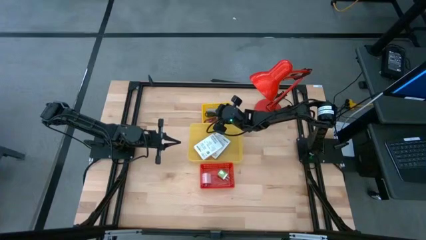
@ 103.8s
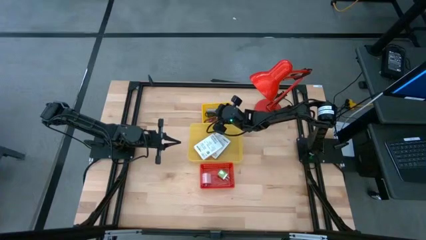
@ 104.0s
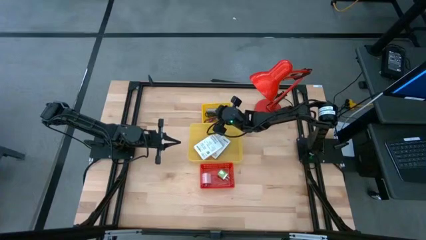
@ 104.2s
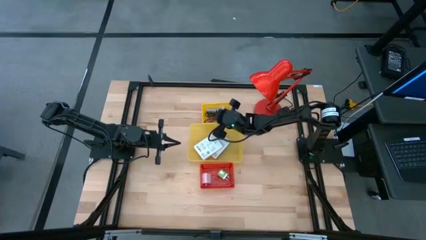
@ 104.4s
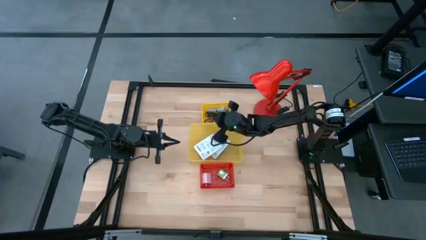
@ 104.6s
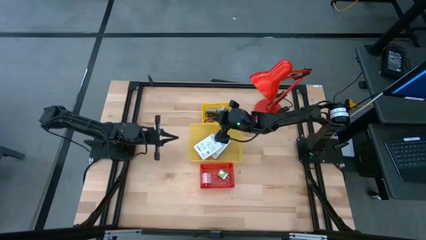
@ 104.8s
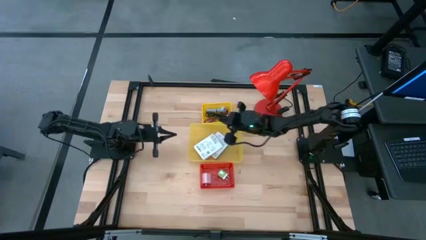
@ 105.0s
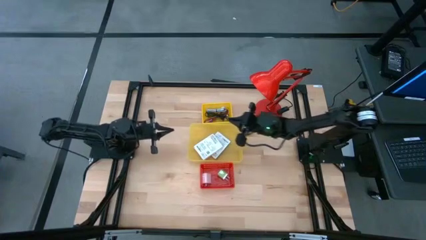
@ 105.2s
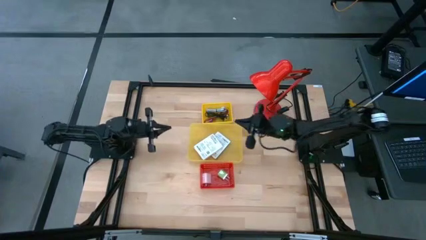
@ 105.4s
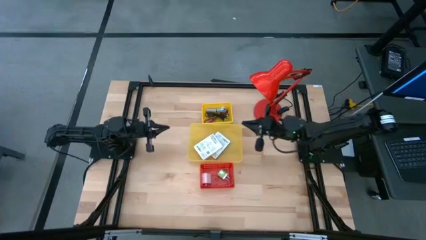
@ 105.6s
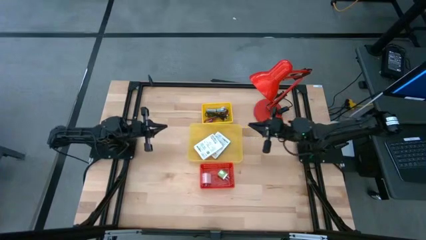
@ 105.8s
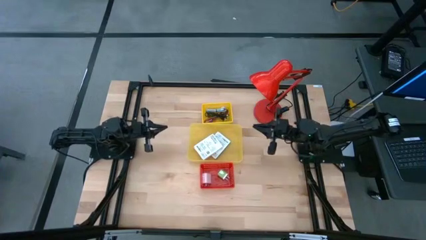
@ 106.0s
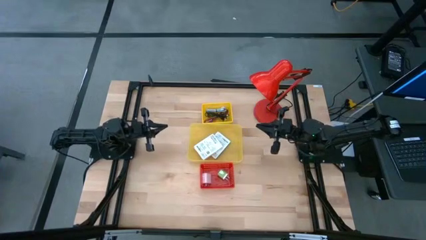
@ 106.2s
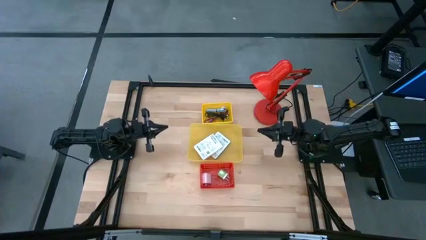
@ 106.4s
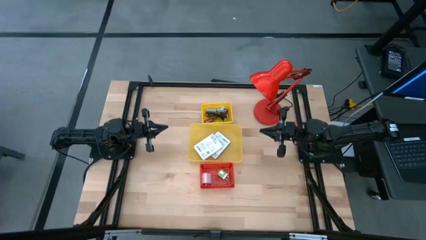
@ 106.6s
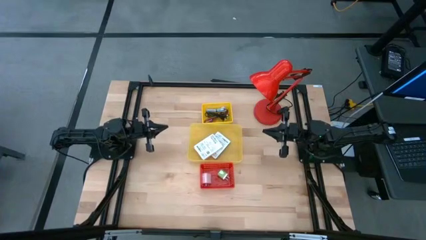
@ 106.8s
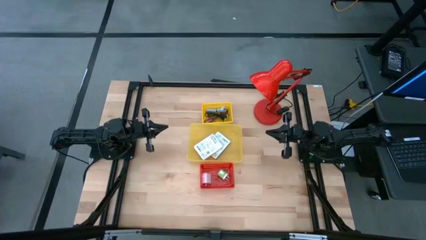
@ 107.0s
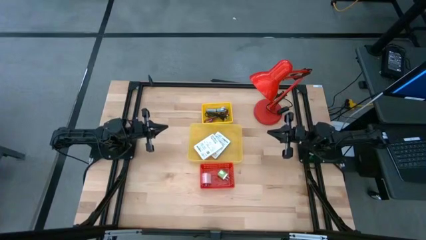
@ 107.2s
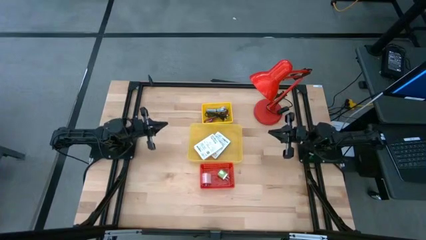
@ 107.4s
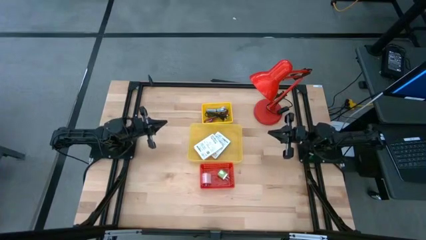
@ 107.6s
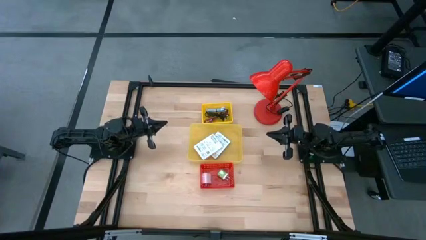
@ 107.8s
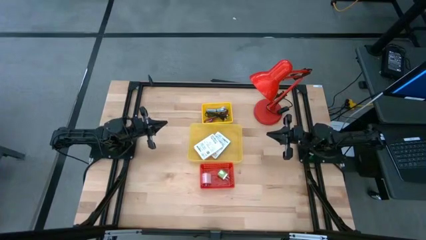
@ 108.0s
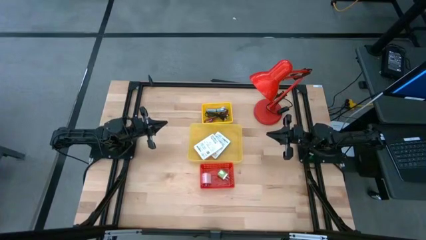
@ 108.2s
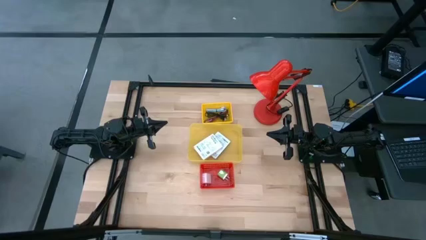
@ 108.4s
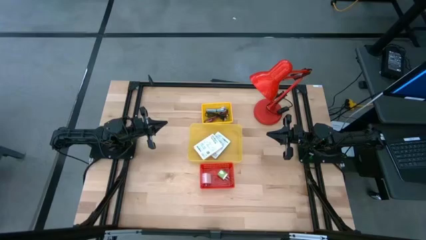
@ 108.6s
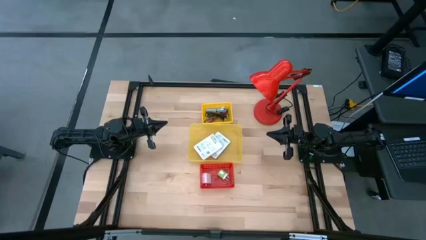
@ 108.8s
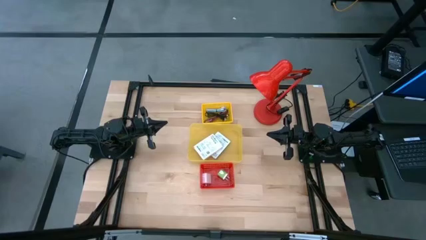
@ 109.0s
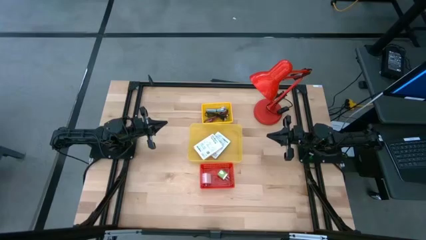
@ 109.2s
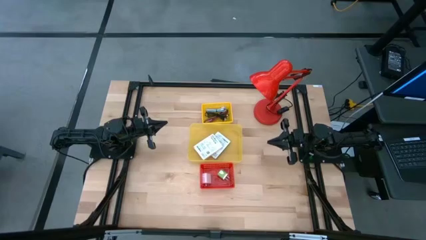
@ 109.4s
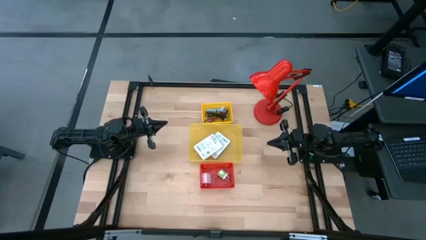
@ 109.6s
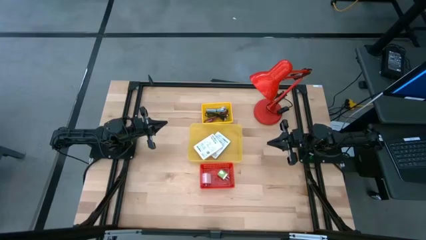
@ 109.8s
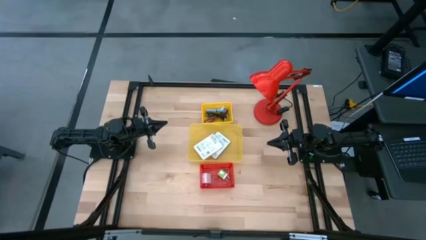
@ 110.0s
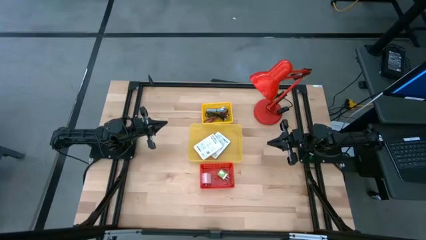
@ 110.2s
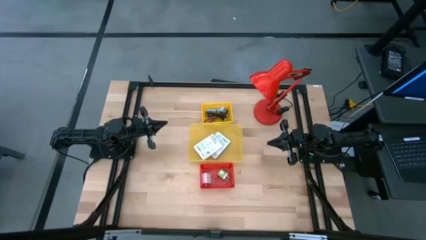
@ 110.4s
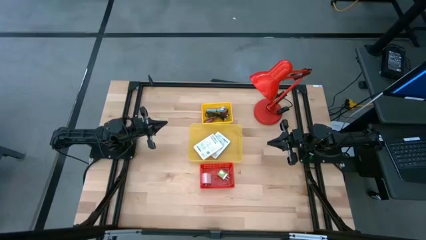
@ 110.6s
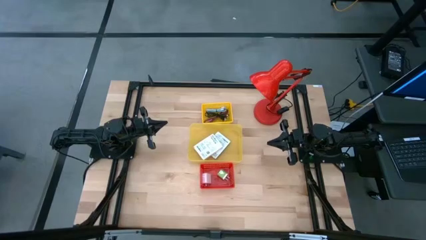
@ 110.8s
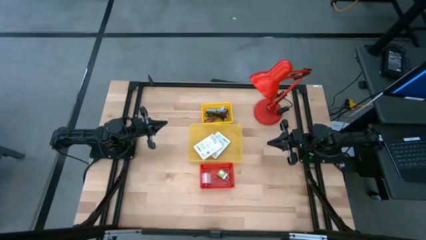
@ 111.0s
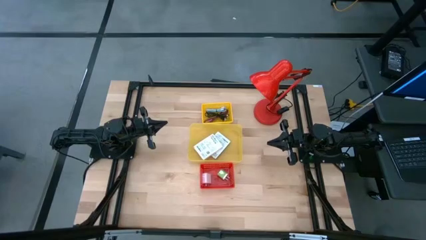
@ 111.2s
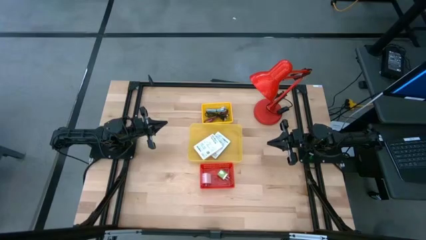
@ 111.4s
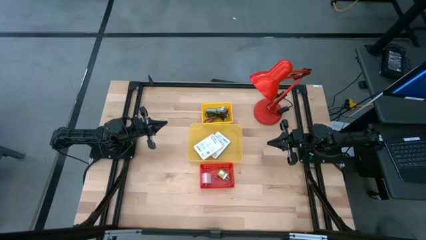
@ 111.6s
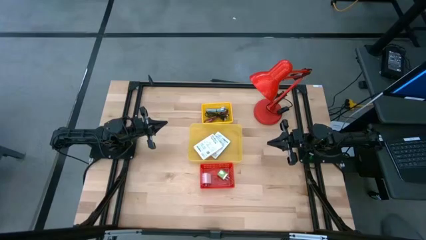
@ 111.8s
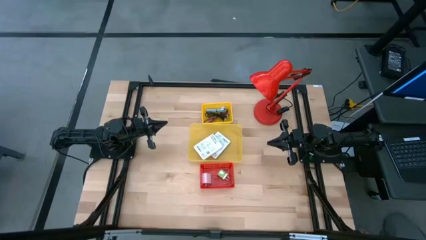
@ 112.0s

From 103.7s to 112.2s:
Task: Pick and place items into bin
Return to Home Position

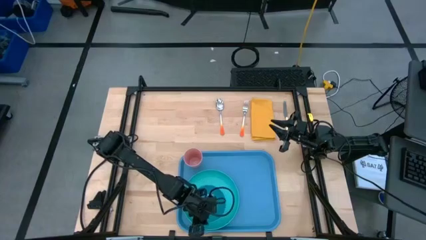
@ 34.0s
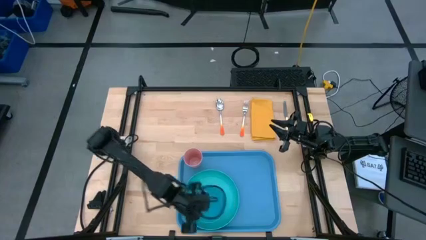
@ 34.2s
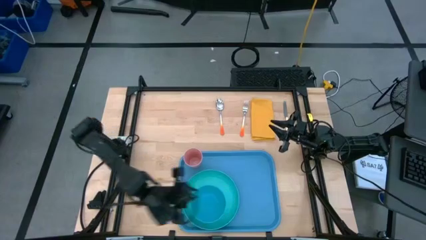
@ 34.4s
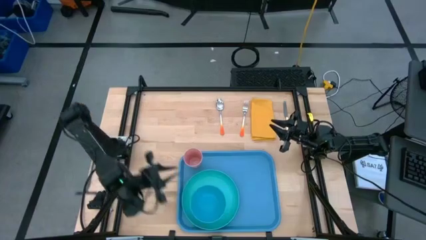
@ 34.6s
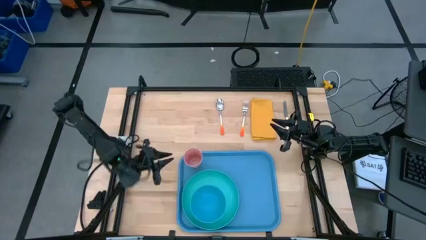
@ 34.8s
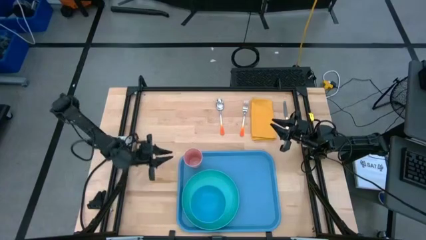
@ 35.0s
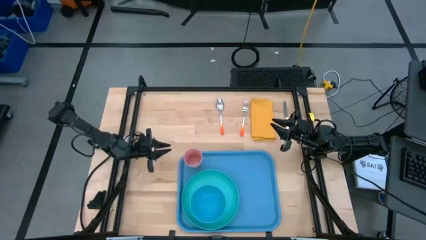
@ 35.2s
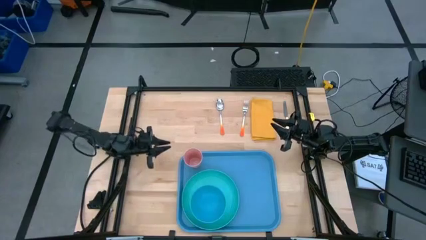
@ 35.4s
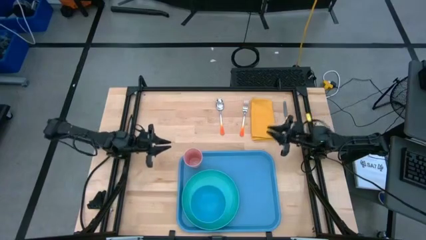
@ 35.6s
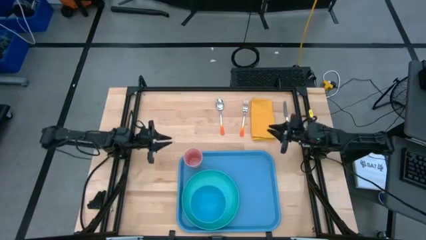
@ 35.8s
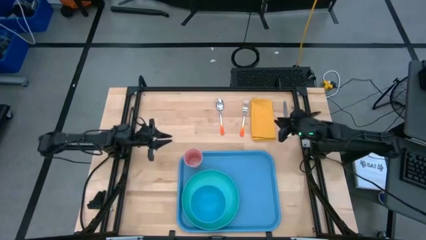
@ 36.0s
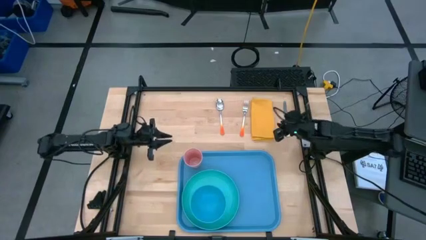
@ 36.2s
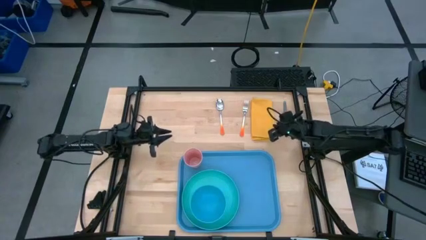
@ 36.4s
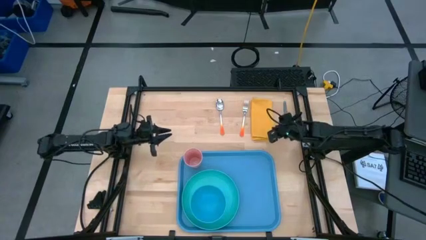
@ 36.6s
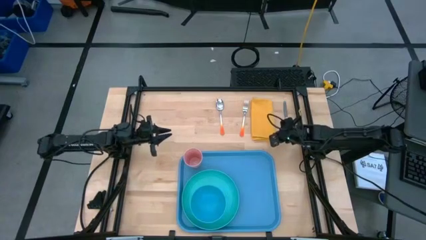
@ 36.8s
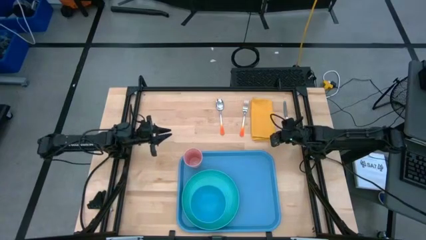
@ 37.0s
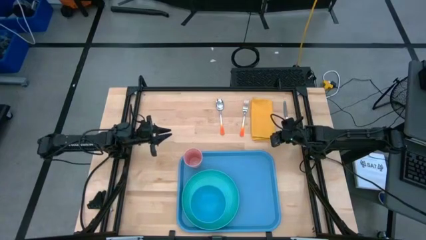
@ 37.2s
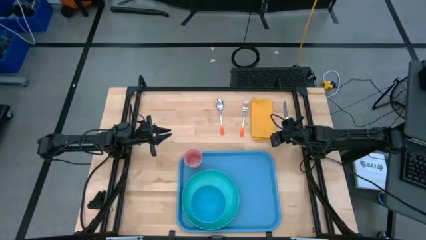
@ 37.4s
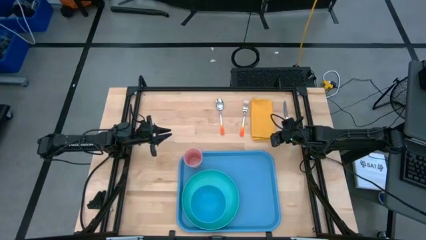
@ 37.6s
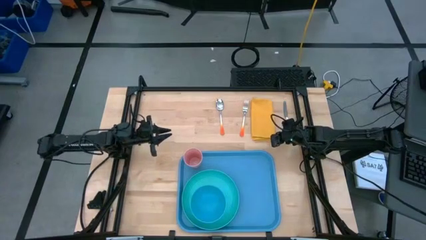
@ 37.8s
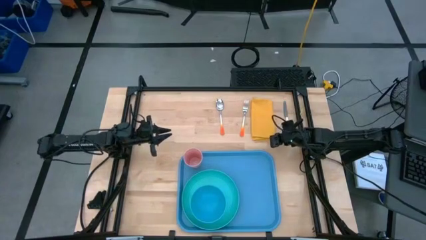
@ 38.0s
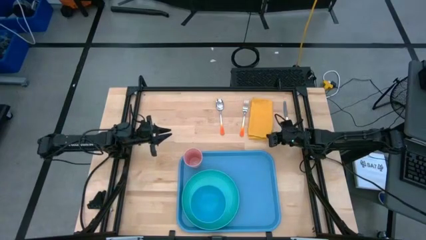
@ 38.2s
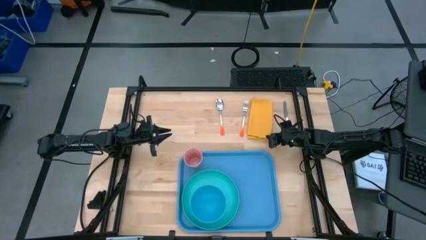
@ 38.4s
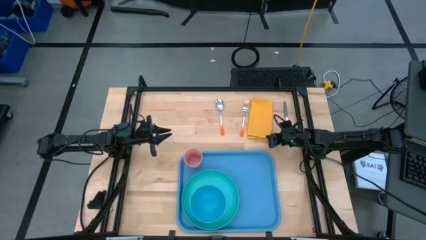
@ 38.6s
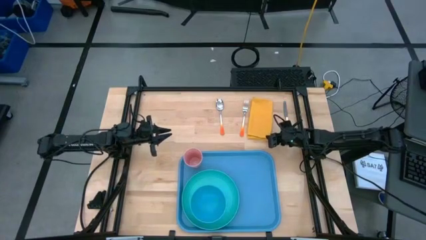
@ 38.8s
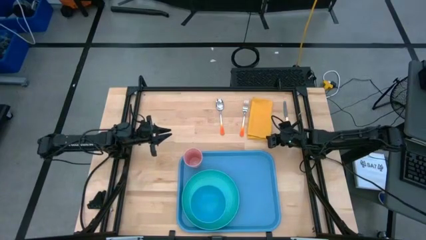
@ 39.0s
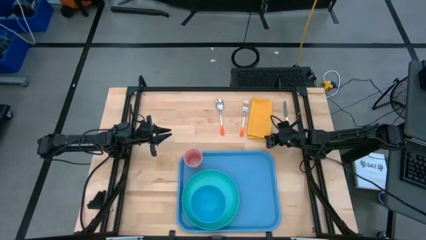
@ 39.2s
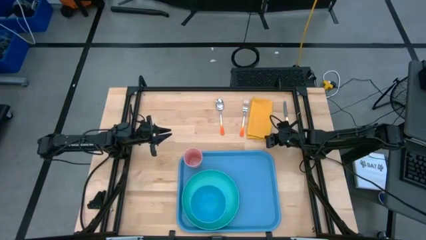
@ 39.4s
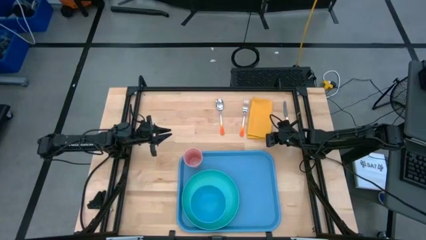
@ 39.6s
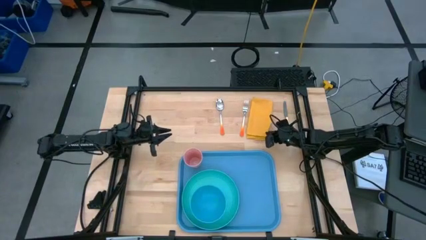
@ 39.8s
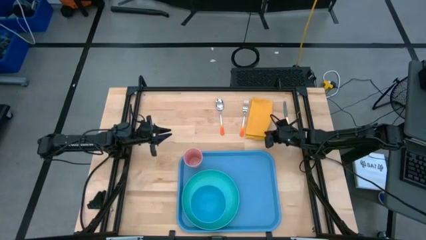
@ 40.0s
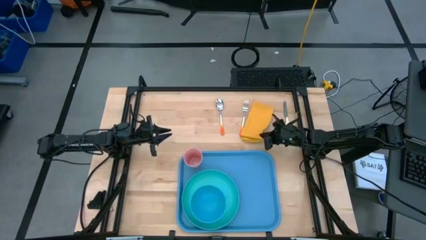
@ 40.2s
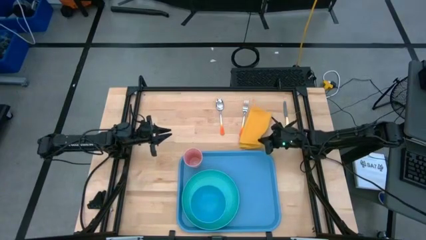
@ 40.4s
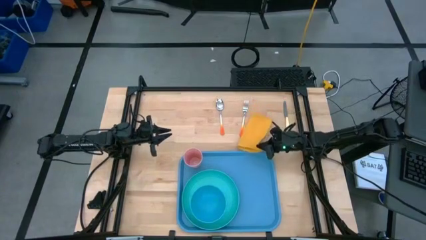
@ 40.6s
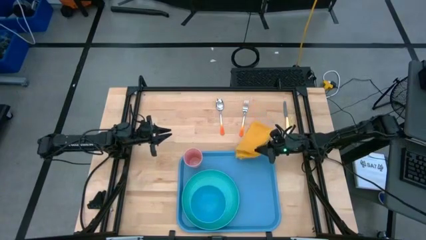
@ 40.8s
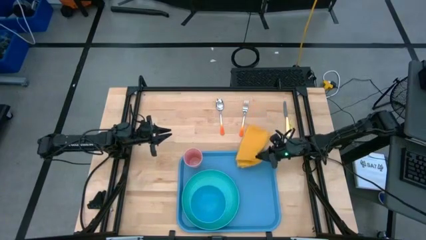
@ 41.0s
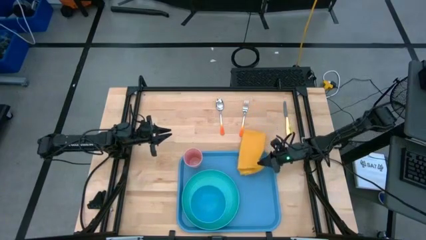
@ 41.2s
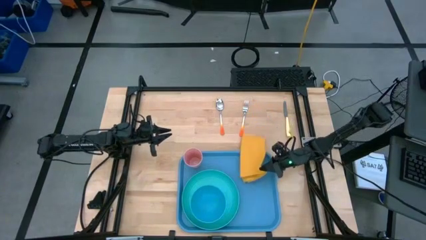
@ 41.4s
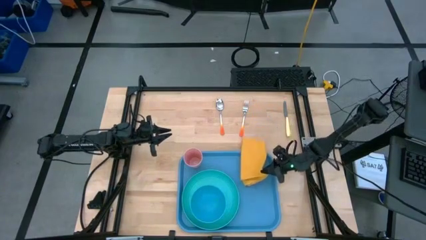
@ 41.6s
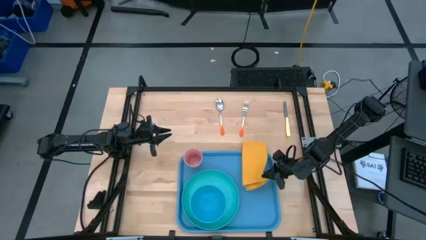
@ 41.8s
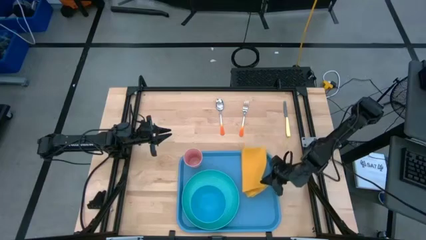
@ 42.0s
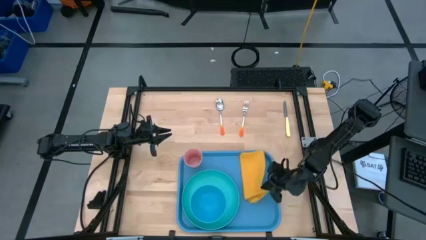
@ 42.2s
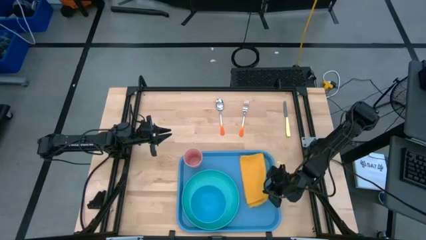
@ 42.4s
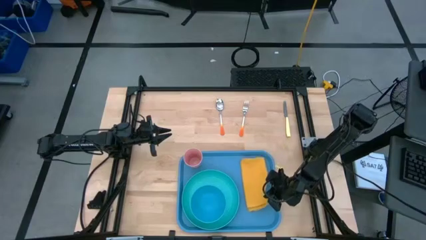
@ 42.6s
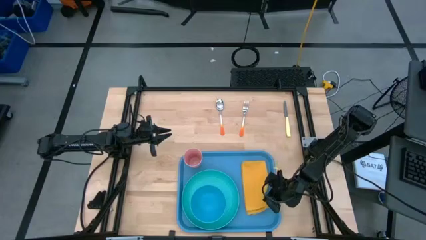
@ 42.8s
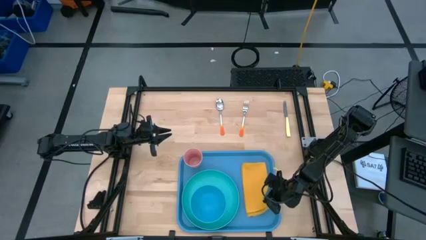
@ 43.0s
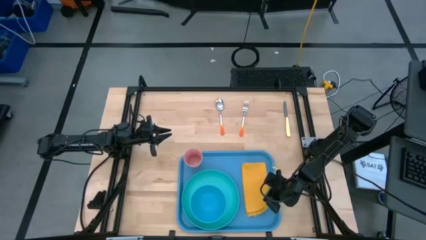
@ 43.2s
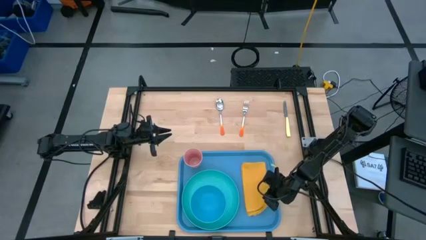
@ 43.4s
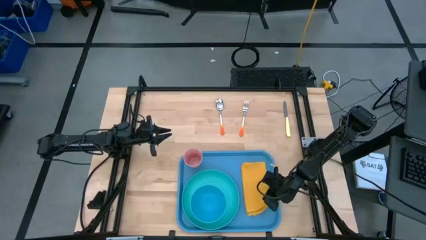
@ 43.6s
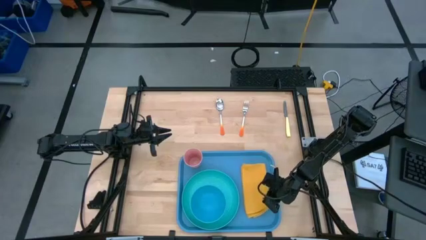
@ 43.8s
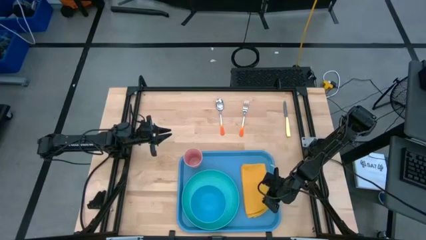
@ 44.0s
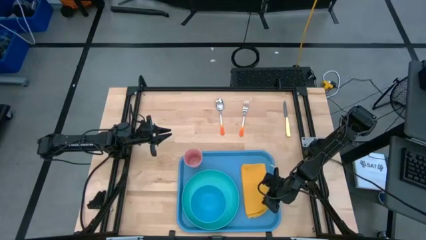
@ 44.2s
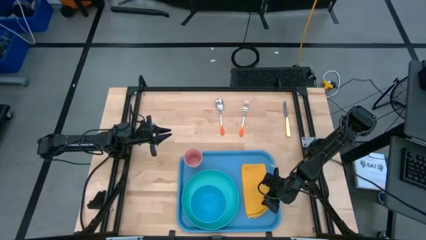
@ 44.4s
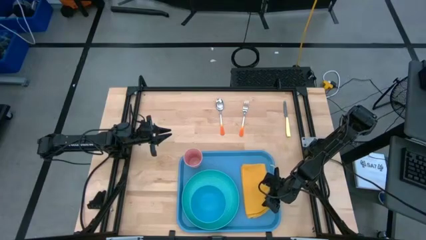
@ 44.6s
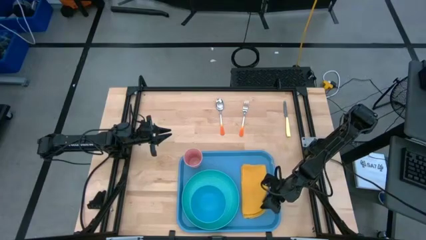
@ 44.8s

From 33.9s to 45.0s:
Task: Set up tray
Put the yellow napkin on the blue serving tray beside the light blue plate
